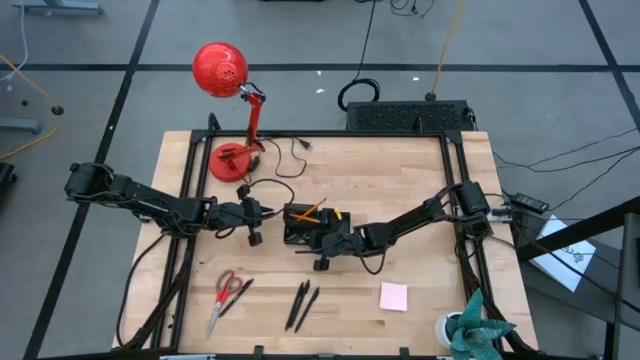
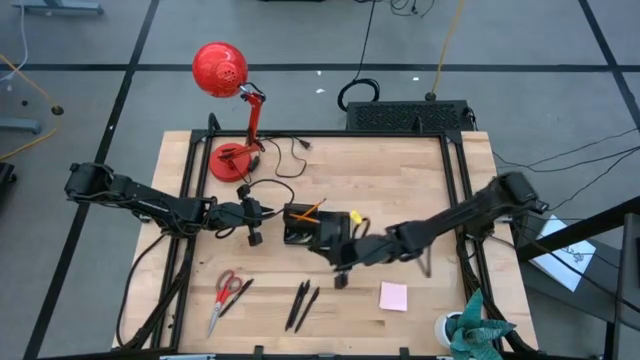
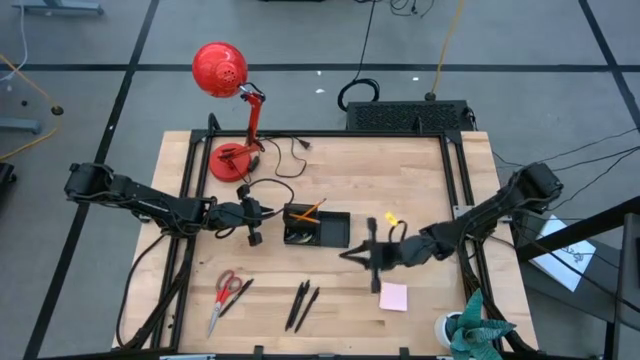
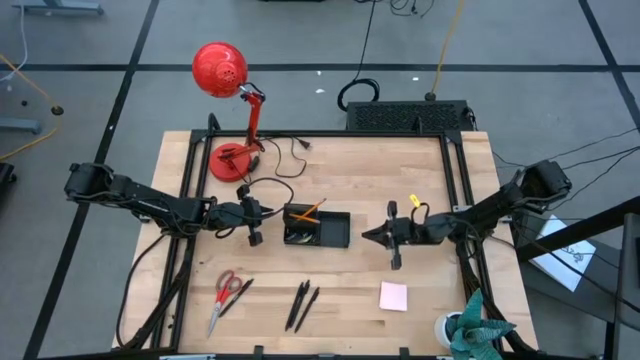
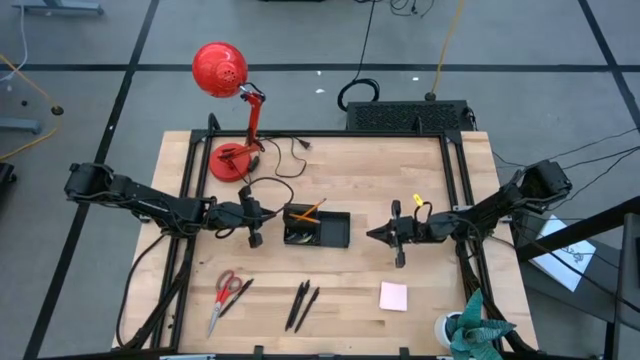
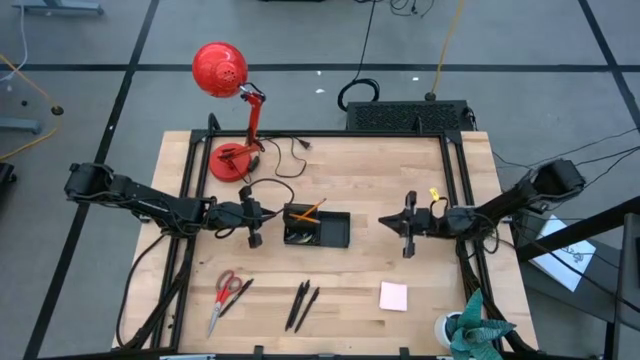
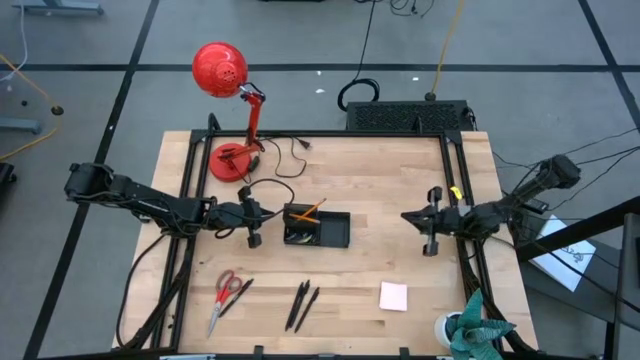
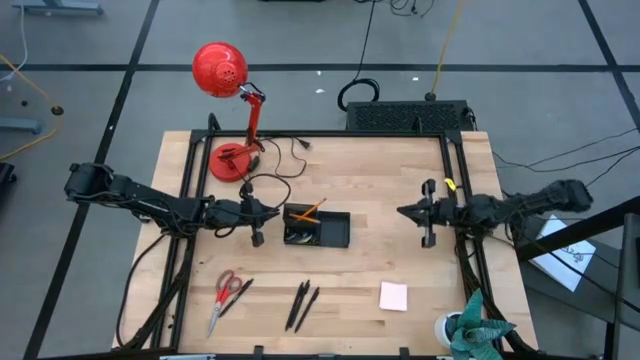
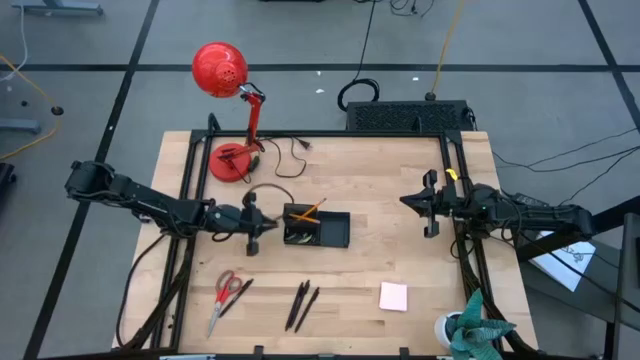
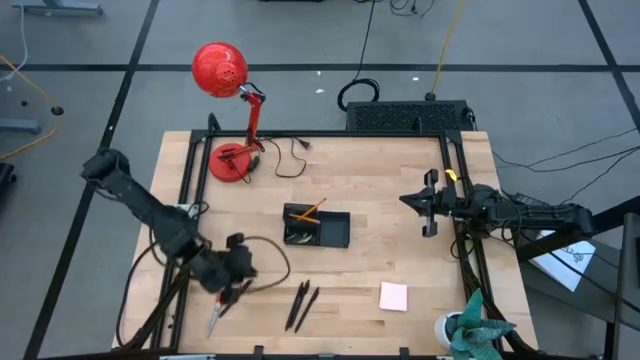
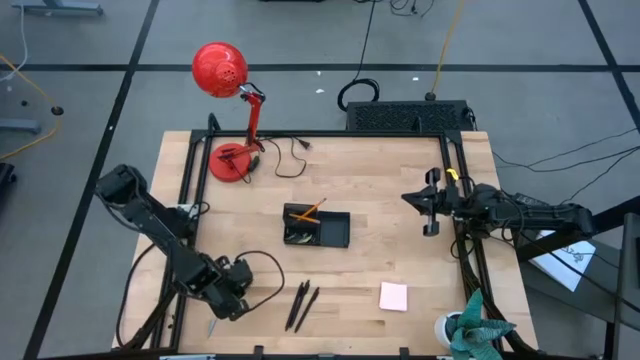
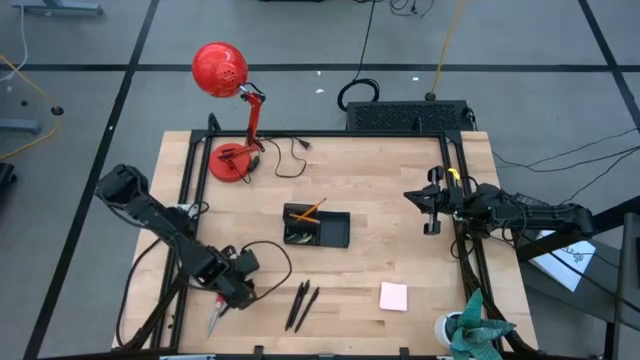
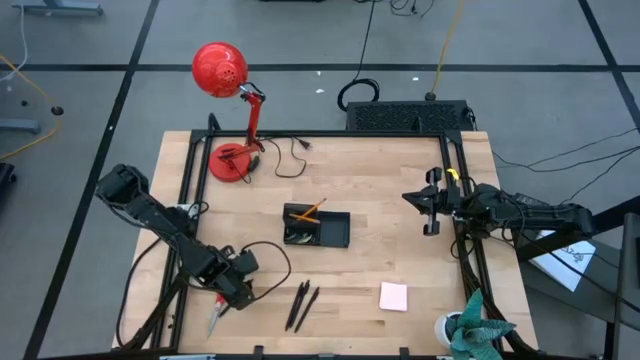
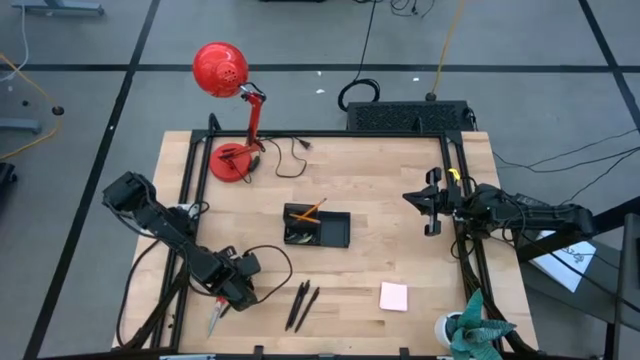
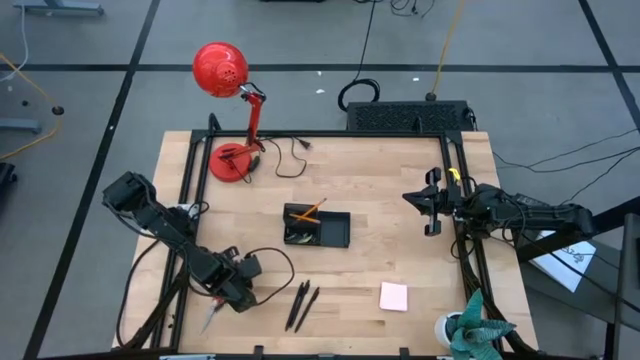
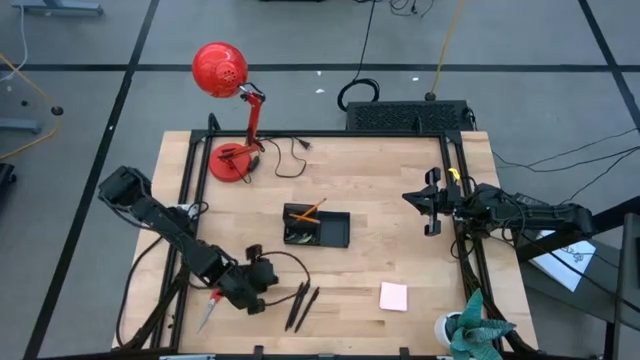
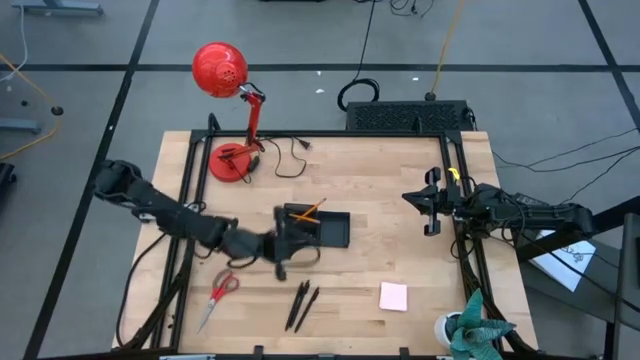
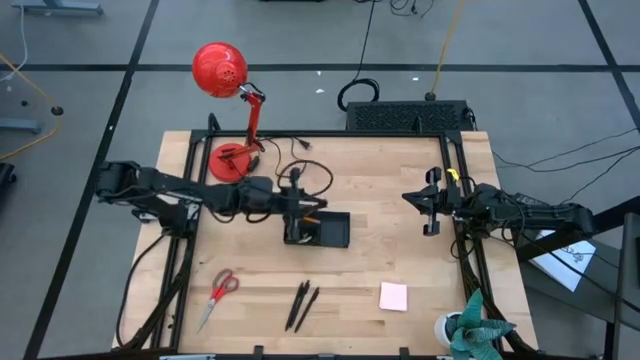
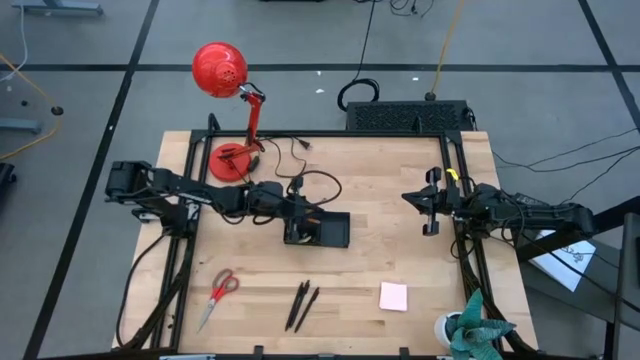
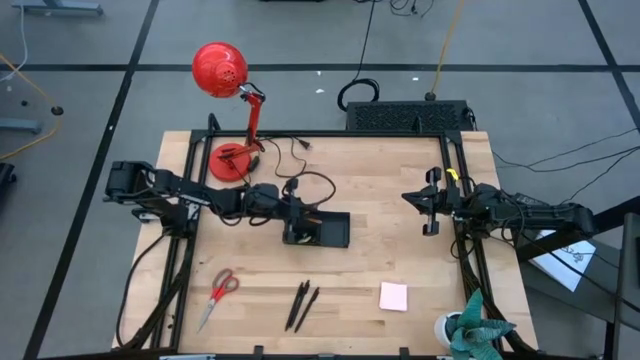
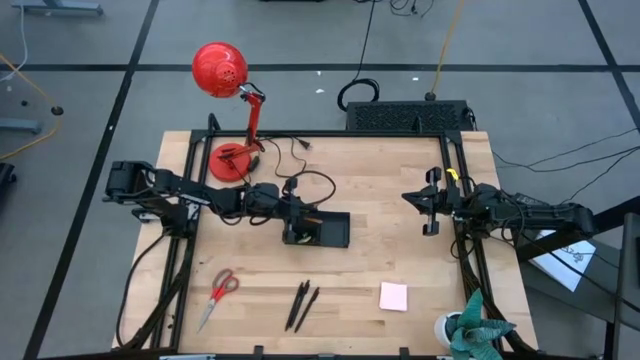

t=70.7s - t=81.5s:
Task: Pick and place office supplies into organizer
Put the pen into the top left section of the desk organizer

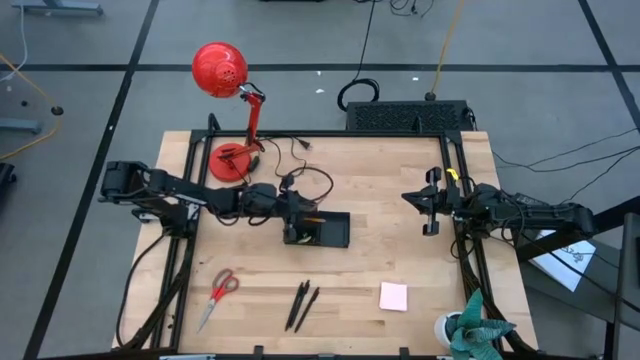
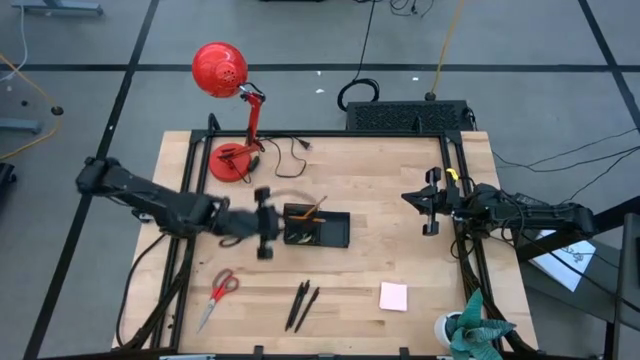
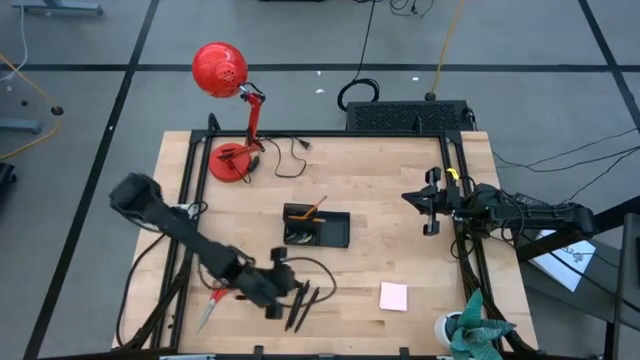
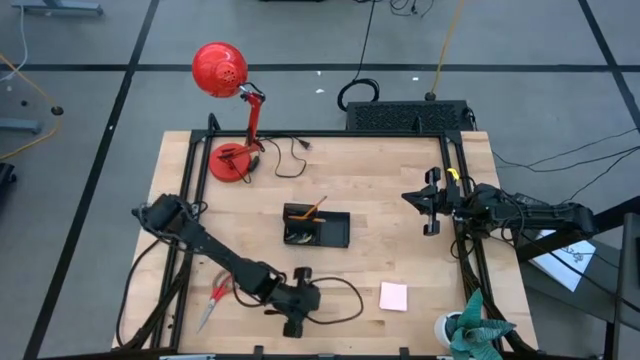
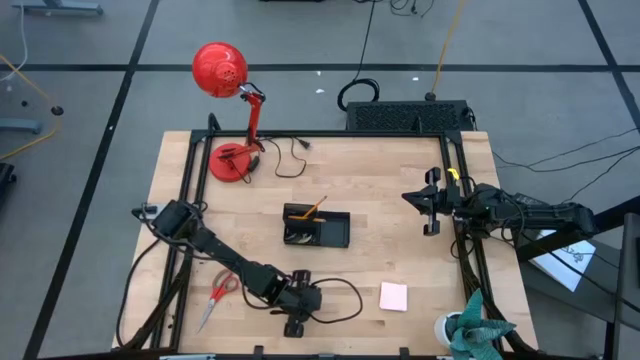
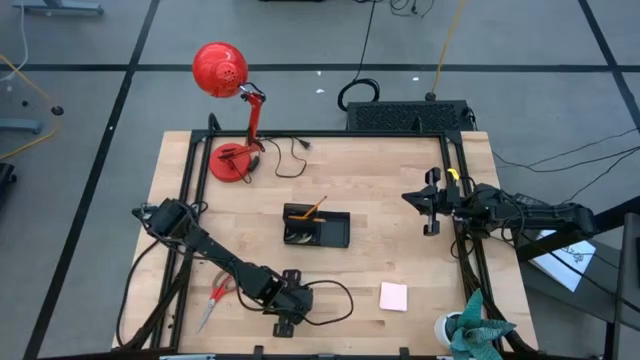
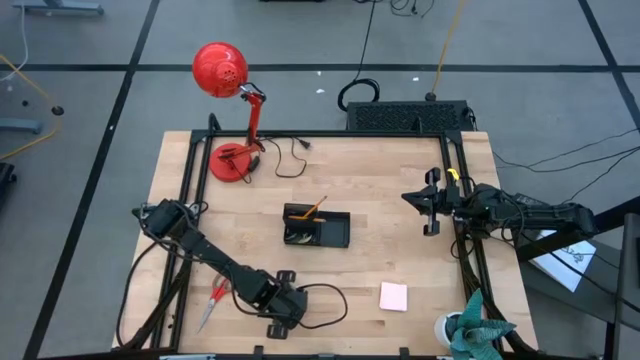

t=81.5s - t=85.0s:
Adjust the black pens on the table

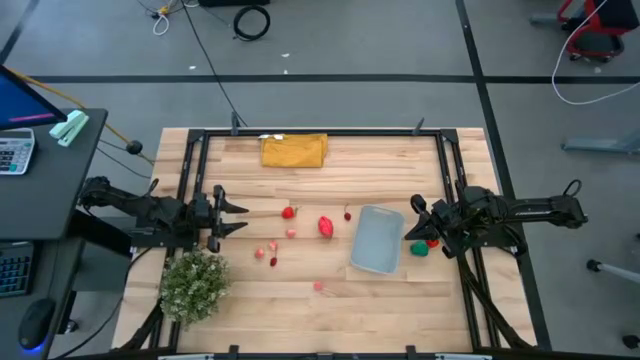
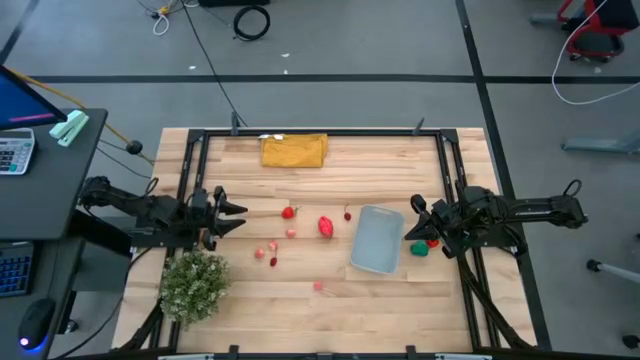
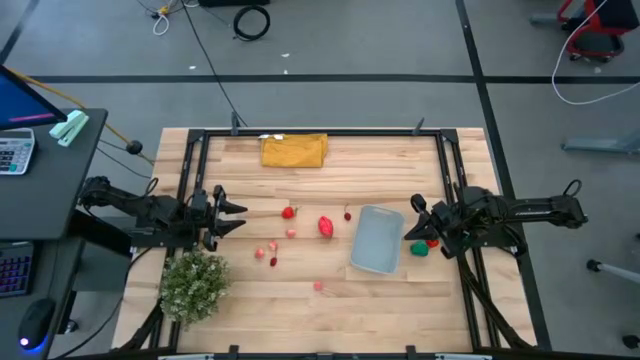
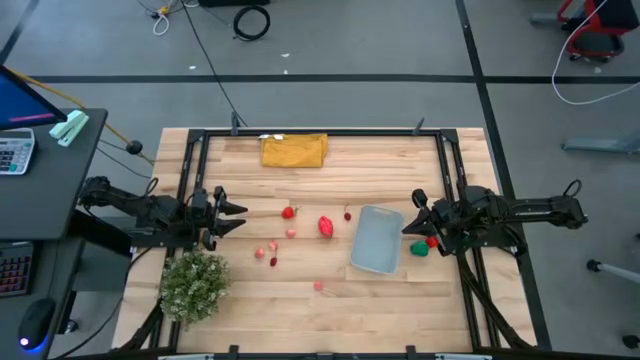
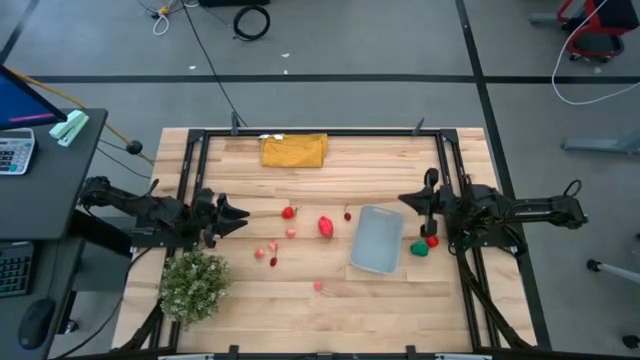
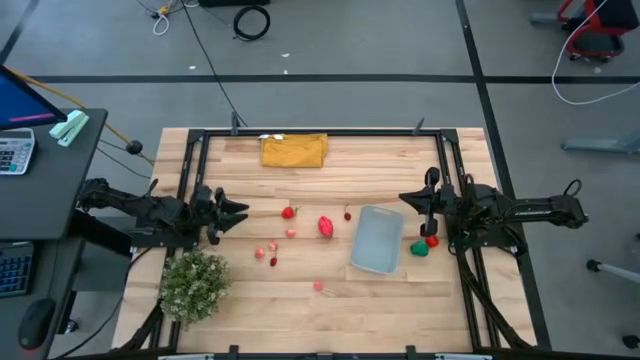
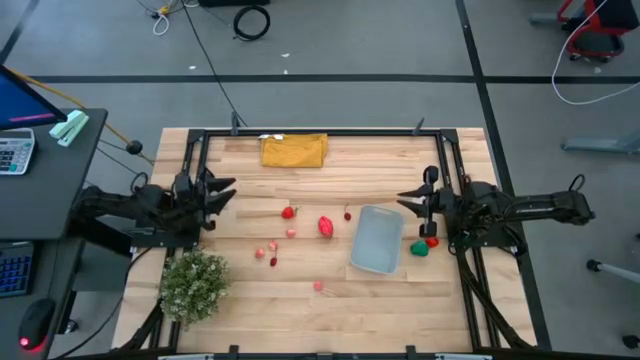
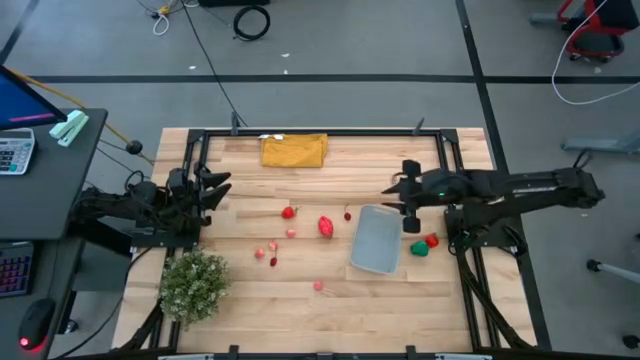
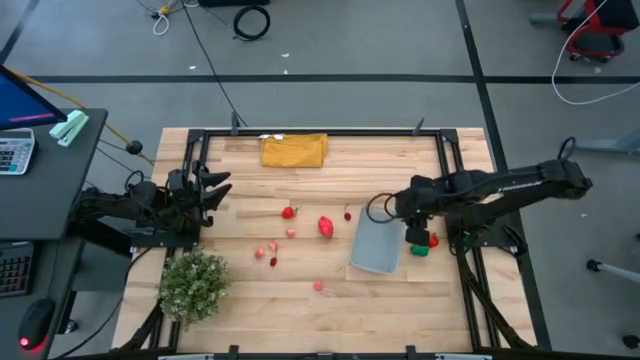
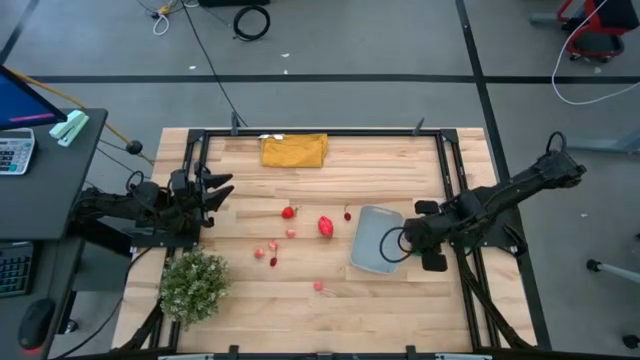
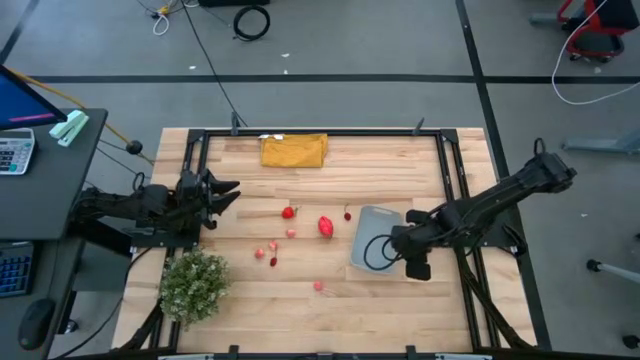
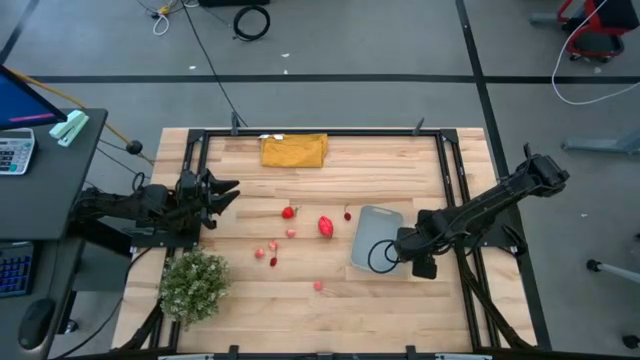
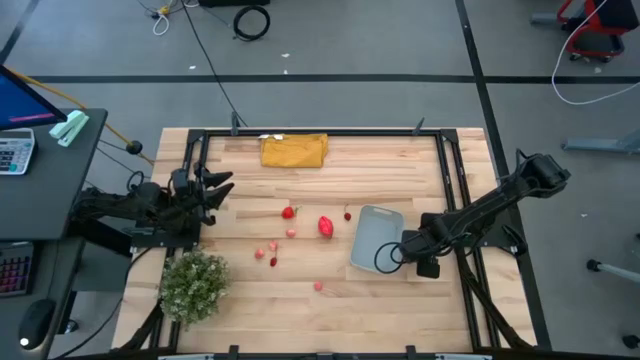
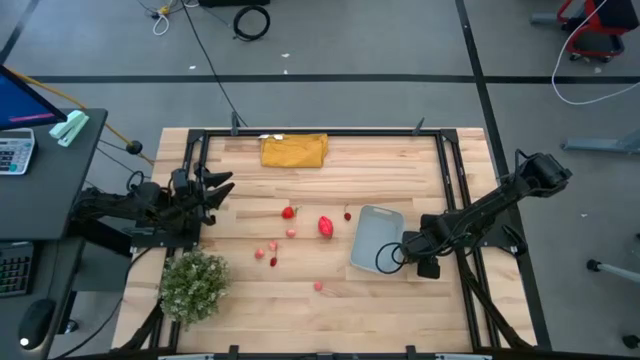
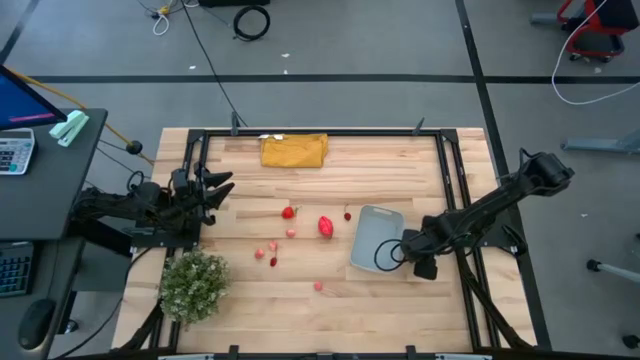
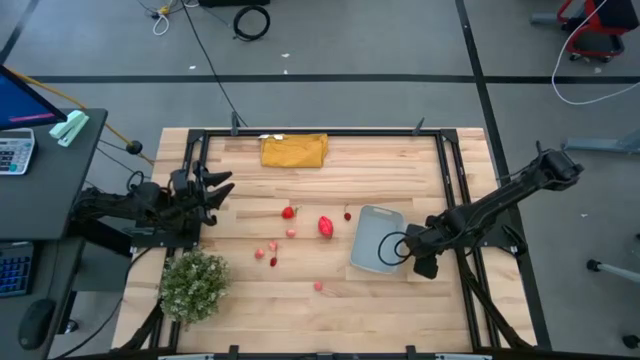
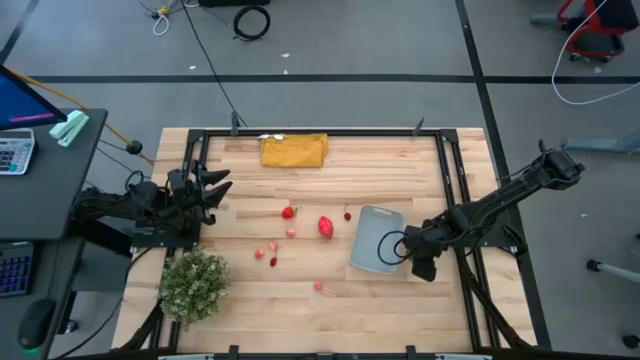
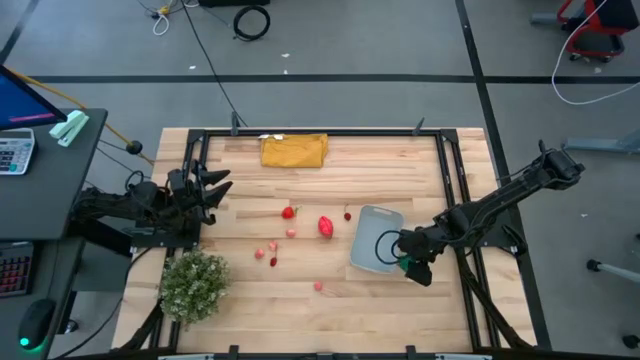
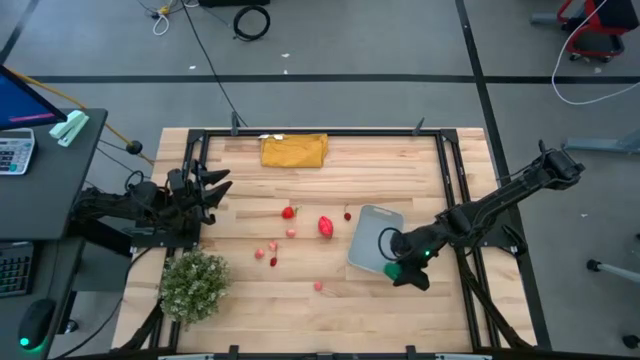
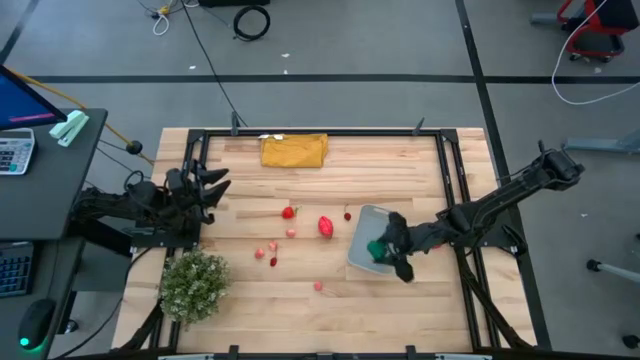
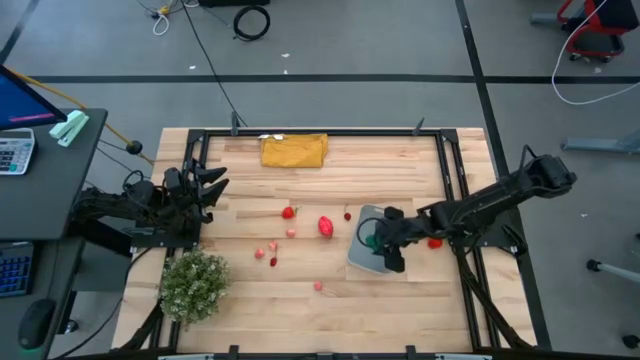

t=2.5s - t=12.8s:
Task: Pick and placing Produce into tupperware
Put the green bell pepper into the gray bin
